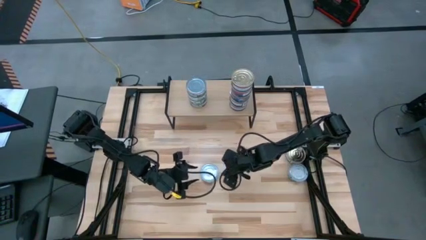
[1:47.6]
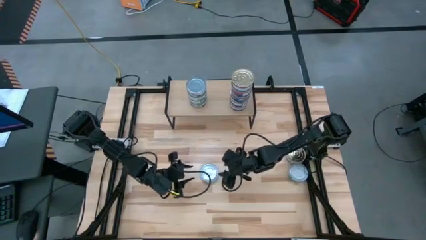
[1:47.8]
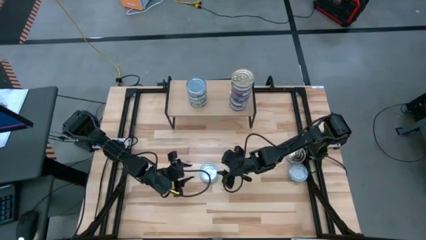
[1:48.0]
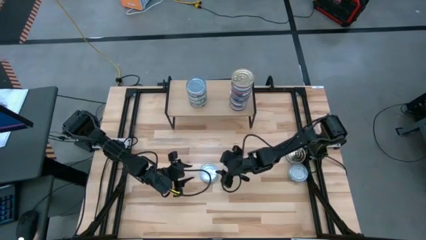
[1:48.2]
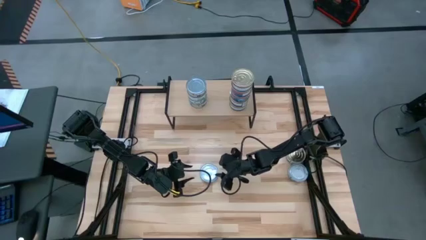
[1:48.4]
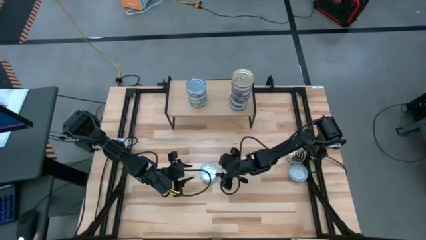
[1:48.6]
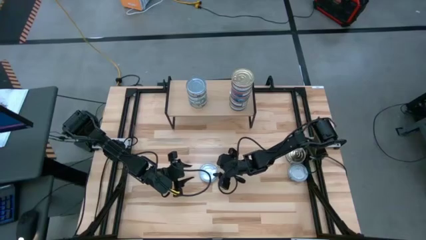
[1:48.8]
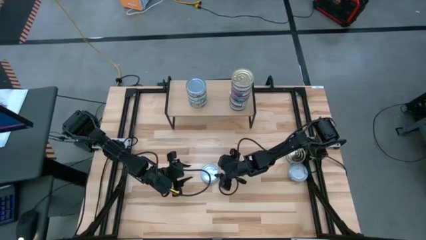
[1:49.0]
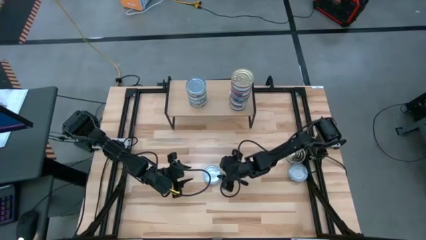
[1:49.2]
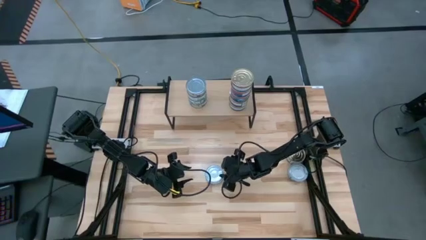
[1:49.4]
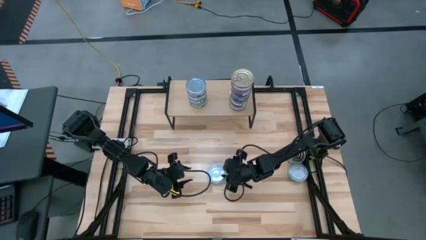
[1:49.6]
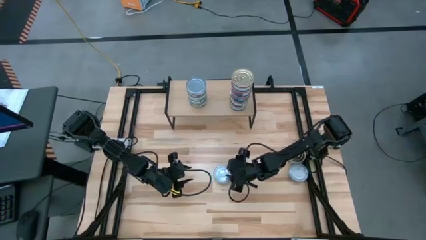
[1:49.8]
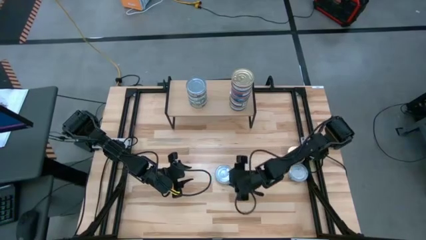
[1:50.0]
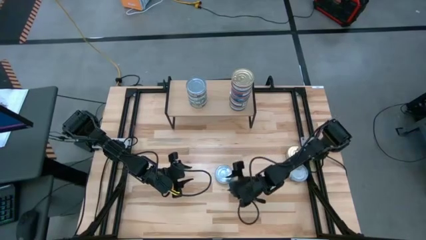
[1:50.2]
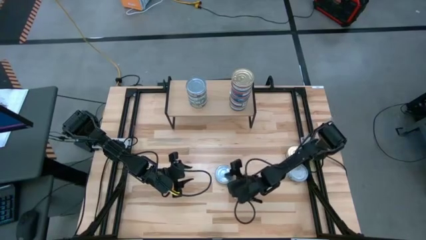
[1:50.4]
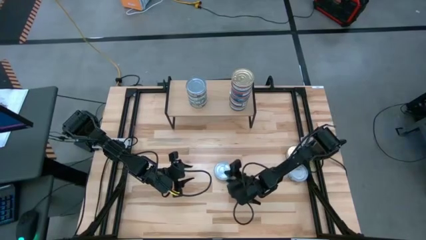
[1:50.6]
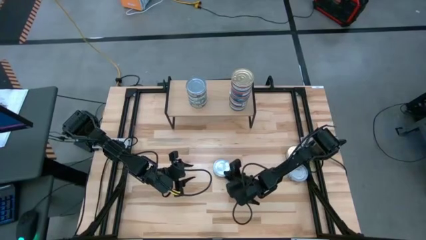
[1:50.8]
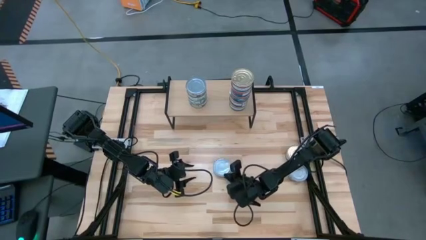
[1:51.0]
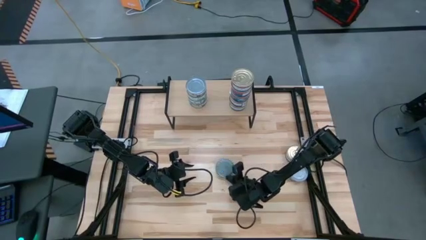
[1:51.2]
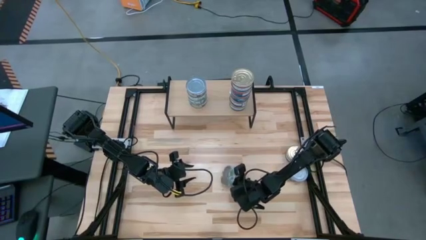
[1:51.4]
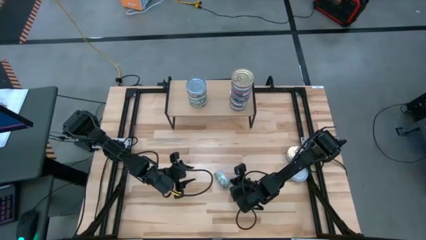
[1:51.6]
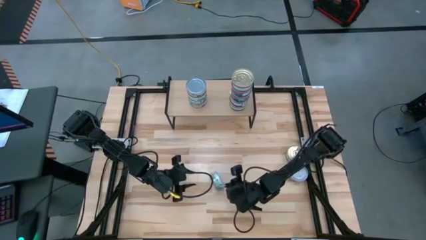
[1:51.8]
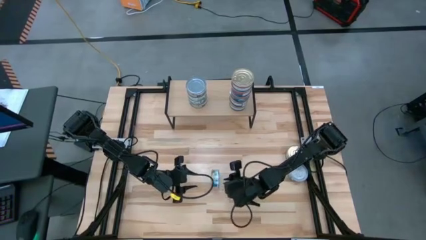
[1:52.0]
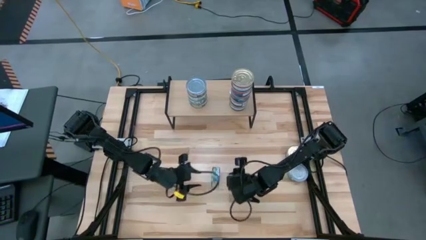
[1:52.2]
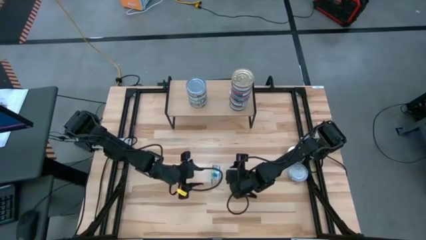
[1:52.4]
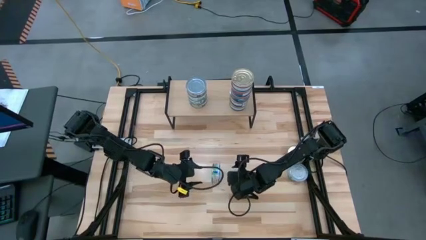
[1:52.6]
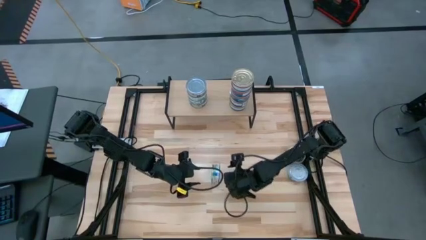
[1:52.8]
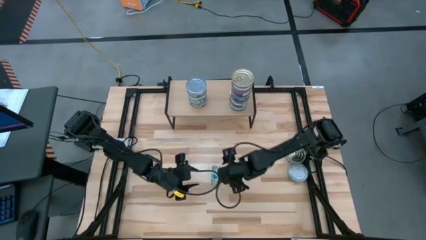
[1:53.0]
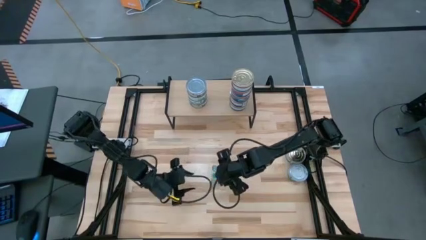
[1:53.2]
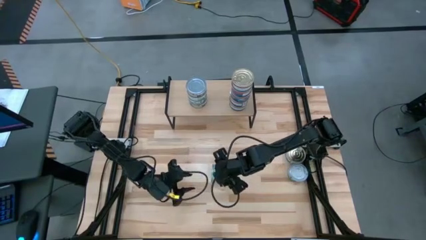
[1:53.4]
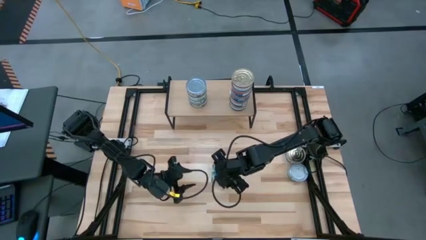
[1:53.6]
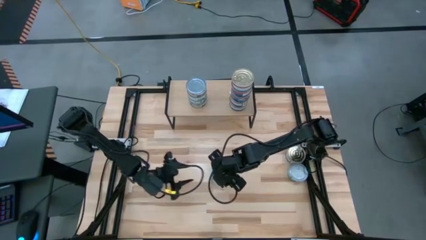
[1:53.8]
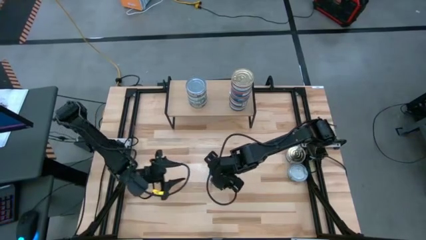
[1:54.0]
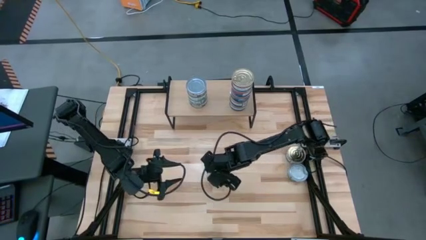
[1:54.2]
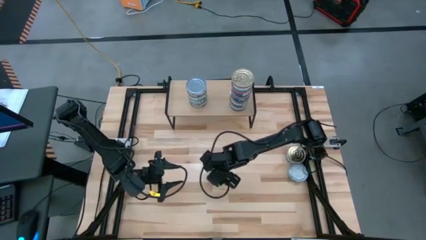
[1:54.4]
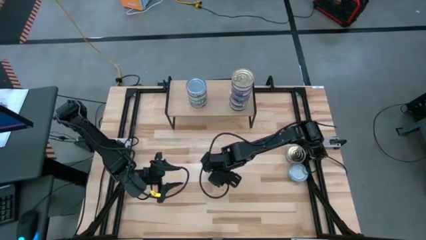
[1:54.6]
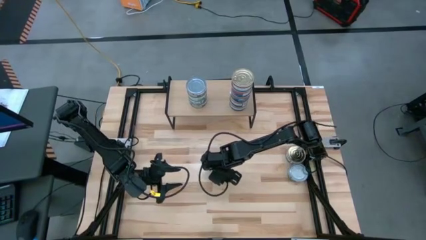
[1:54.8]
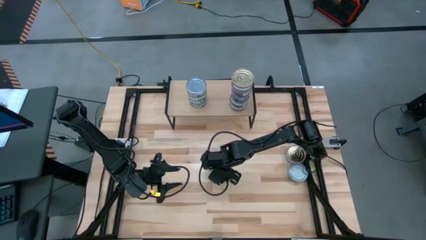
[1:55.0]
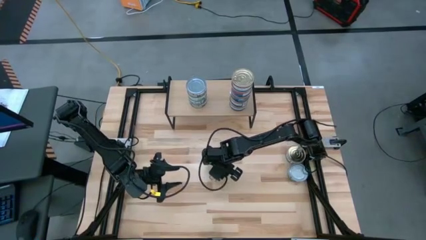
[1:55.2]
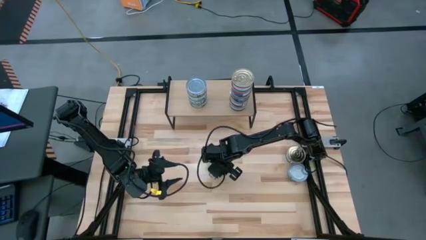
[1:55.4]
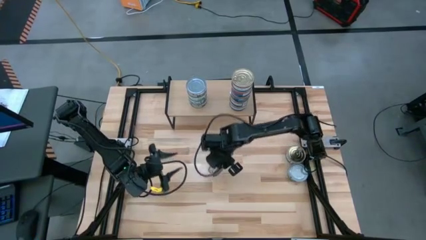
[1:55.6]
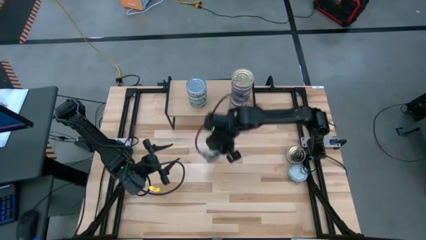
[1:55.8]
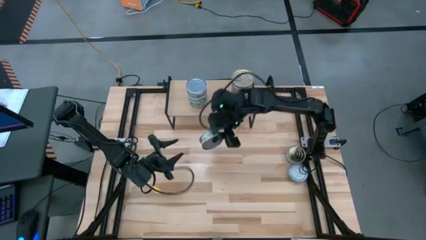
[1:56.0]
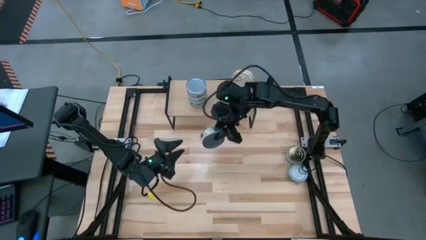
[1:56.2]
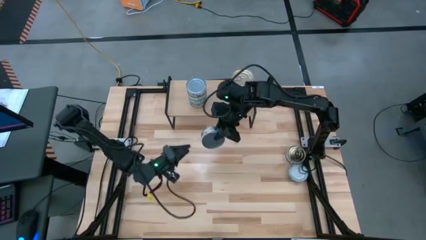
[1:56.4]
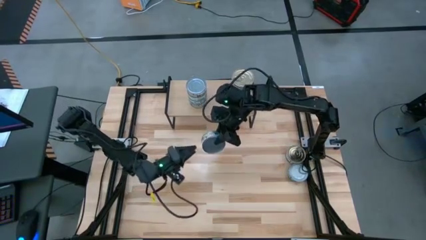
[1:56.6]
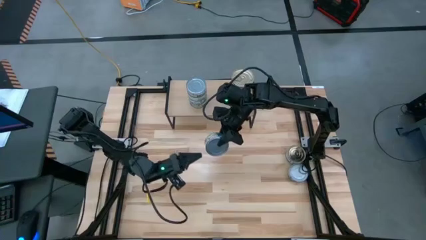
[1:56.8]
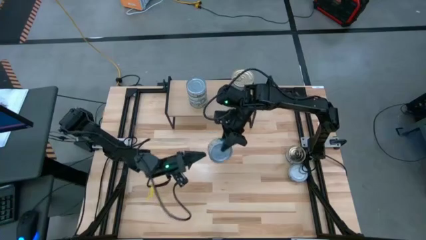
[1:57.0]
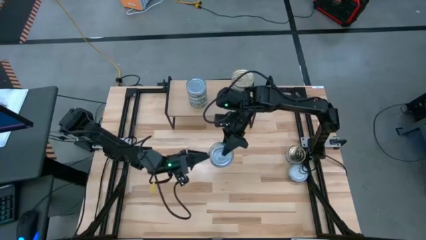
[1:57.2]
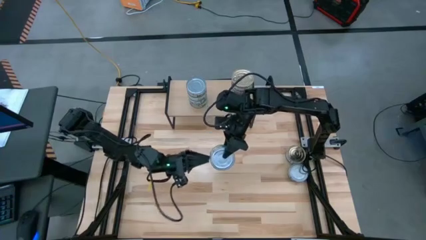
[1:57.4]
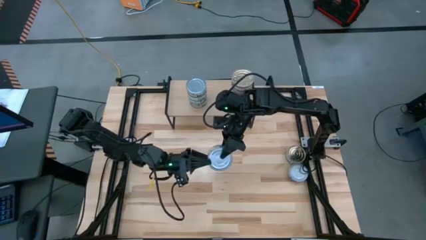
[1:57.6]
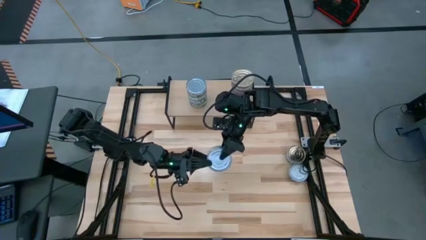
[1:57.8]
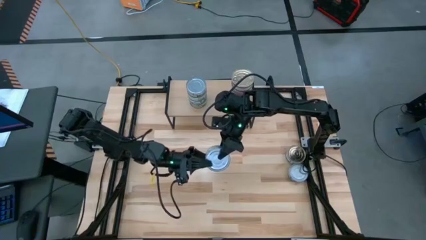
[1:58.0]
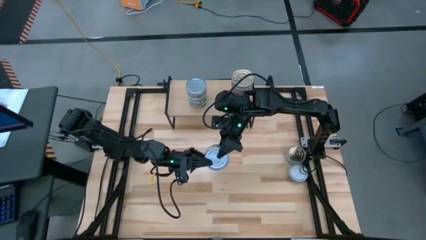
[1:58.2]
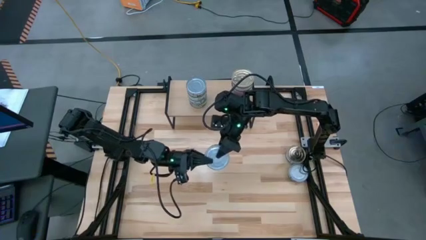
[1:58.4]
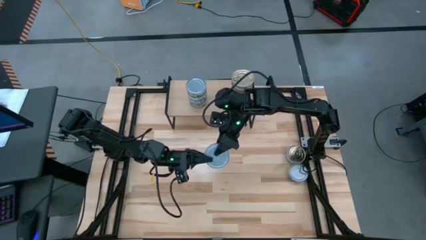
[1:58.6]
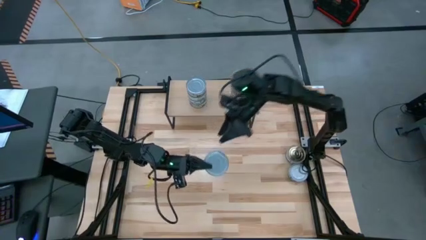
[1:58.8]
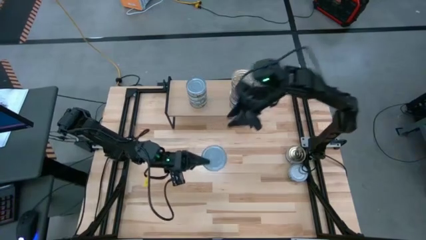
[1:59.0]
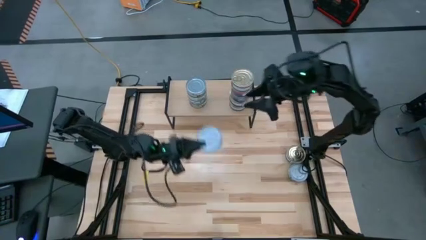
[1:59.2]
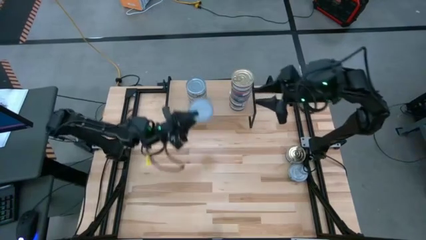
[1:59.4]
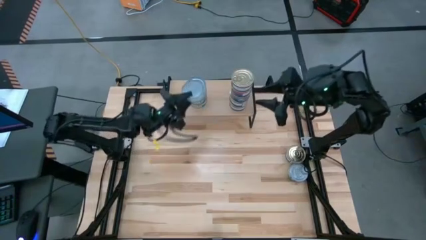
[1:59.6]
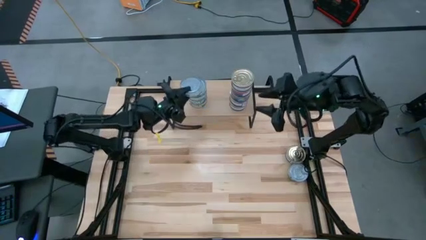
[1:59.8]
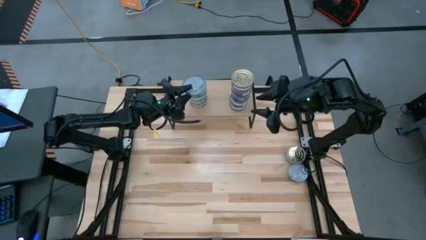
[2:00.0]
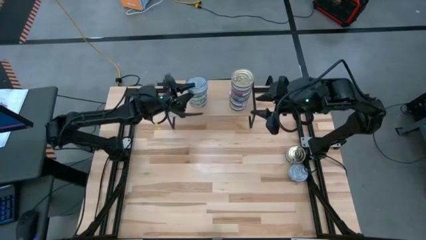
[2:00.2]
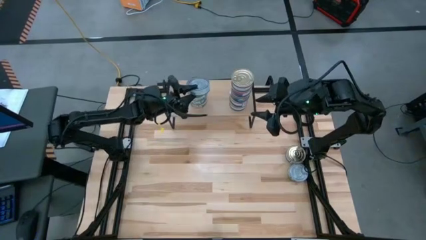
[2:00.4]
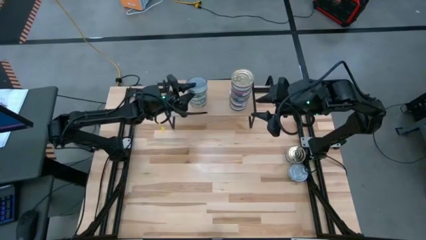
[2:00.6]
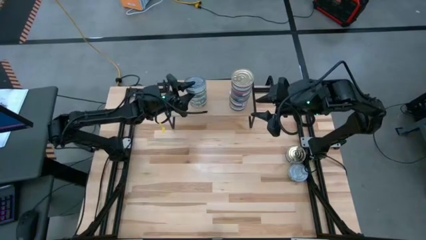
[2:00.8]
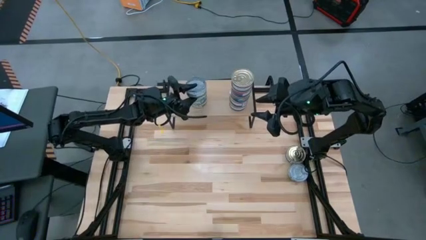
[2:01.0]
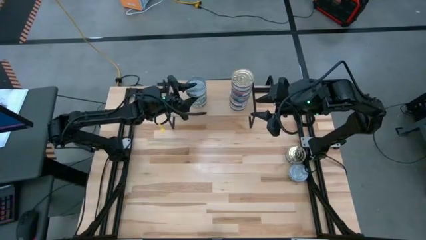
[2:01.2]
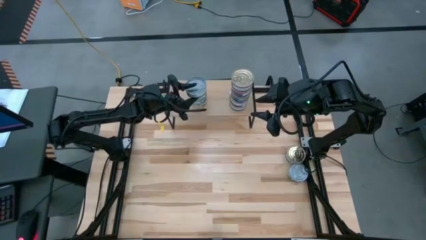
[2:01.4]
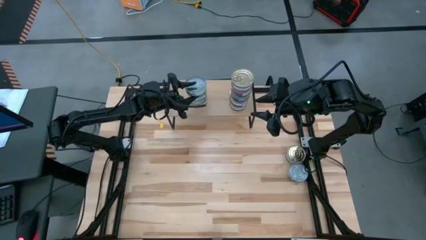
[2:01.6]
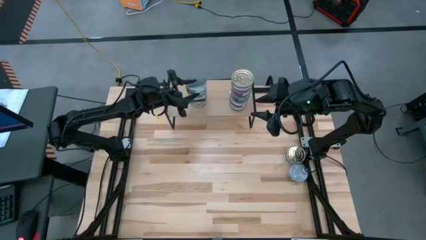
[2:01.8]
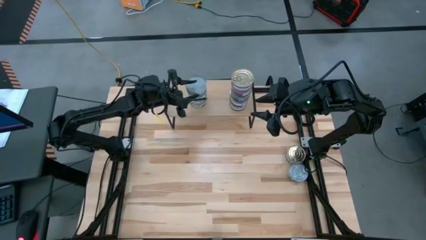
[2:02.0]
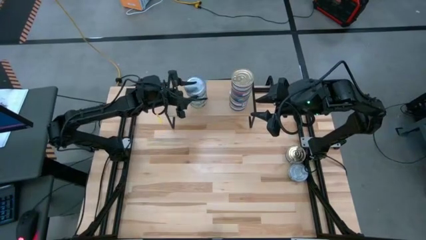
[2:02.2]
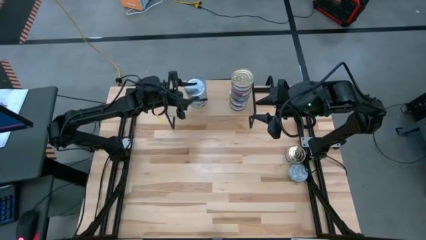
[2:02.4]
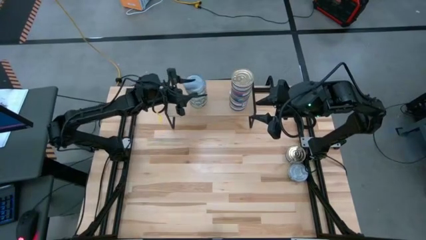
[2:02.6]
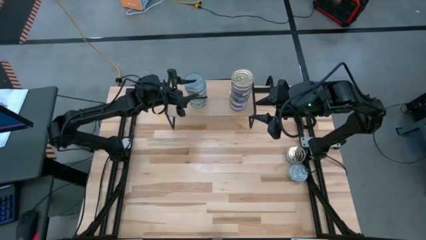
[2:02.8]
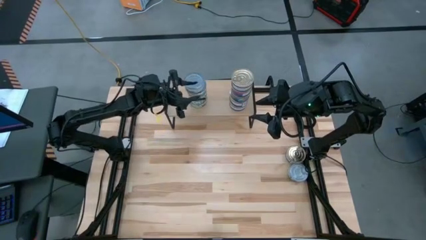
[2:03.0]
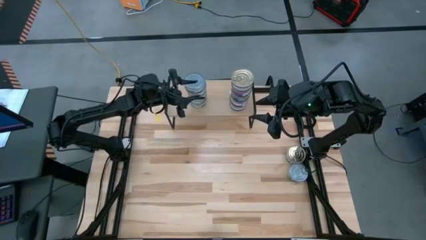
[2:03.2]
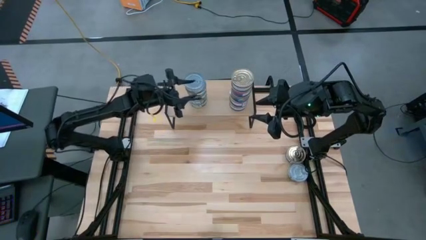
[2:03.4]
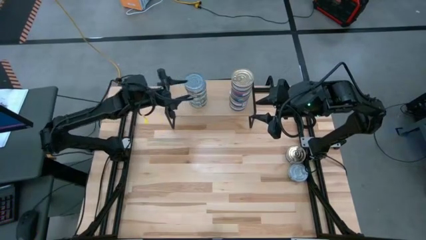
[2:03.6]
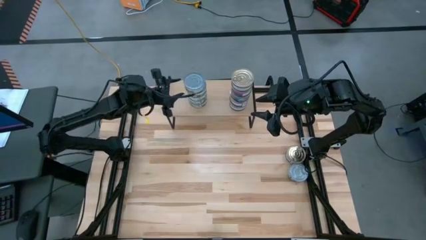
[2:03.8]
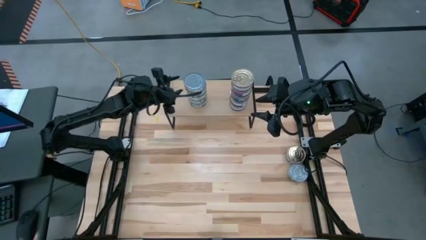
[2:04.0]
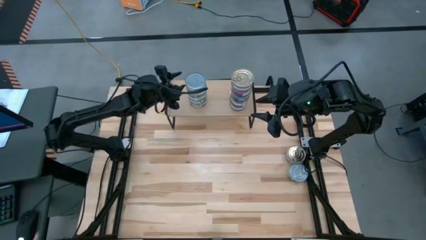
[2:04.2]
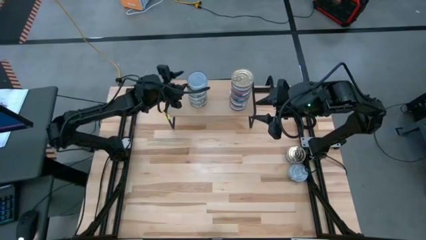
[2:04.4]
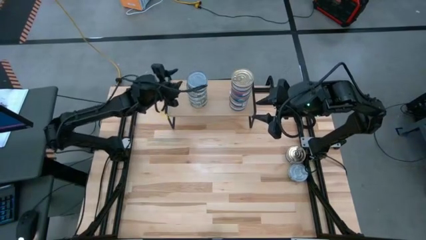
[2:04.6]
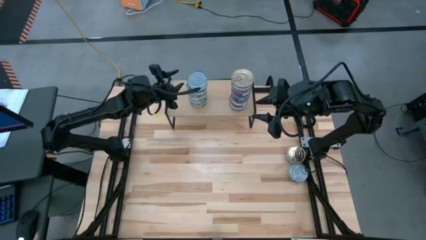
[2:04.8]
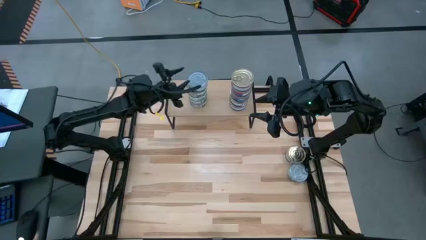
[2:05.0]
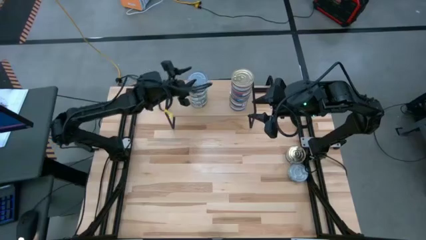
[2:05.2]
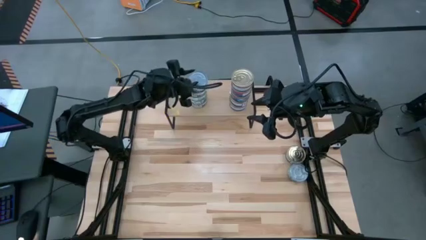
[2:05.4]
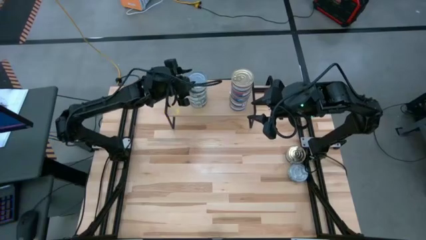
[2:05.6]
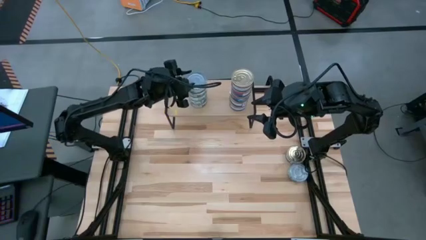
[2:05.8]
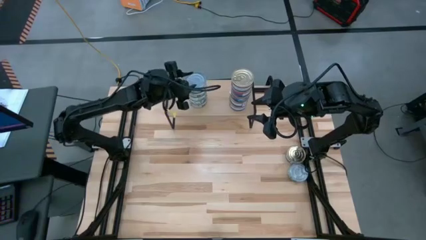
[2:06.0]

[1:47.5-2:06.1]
Task: Stack canned seafood by type on shelf
Stack the green tuna can on top of the green tuna can on the shelf
